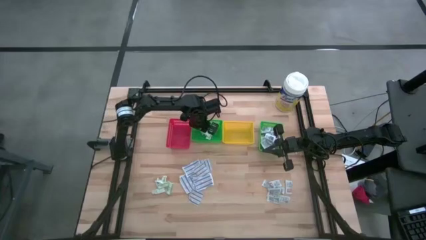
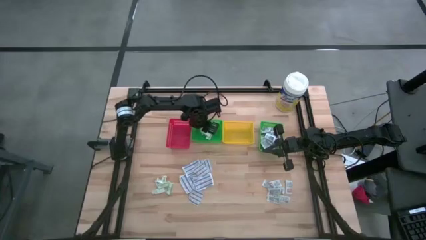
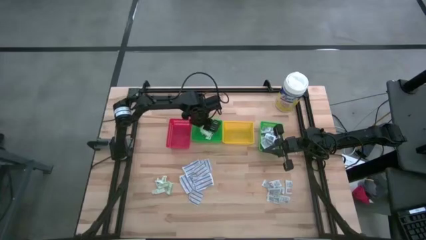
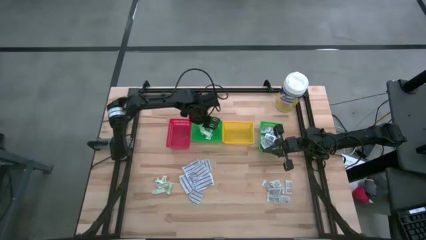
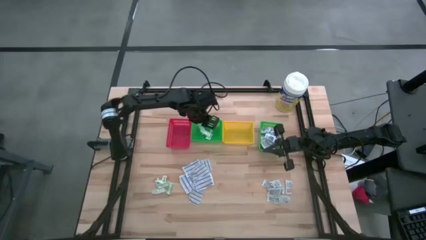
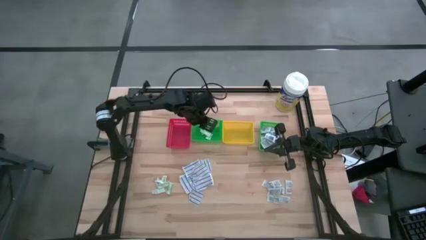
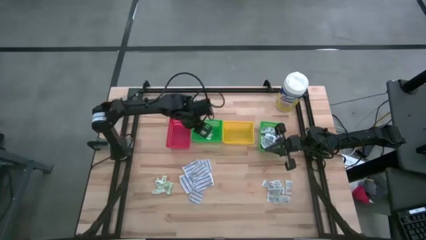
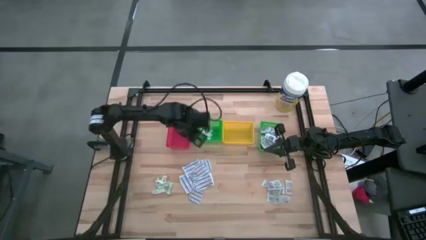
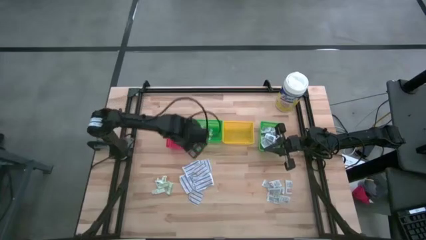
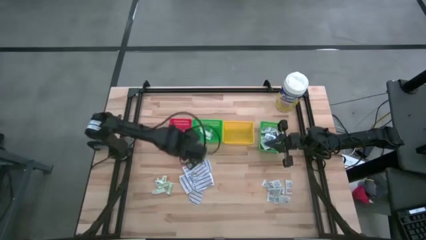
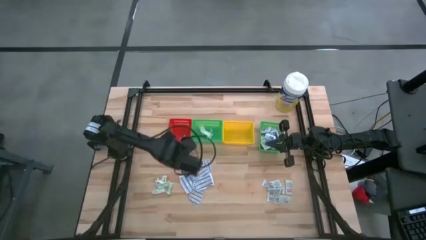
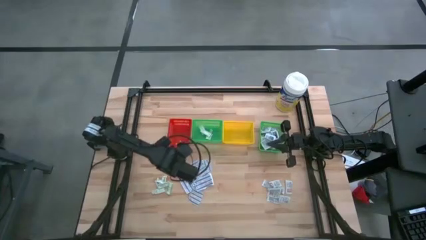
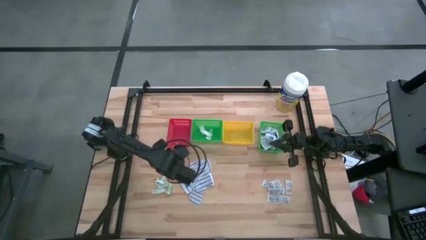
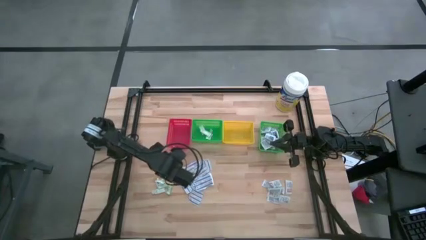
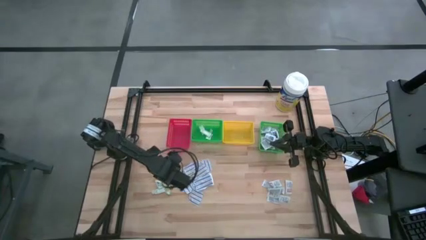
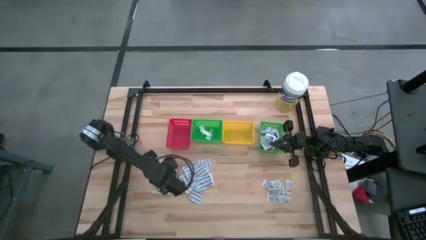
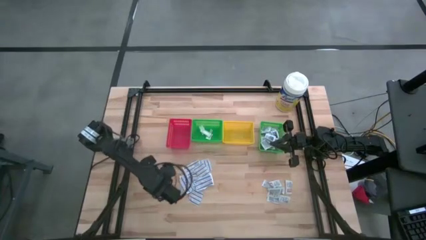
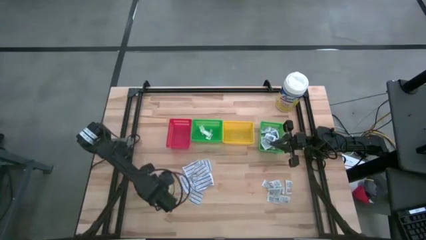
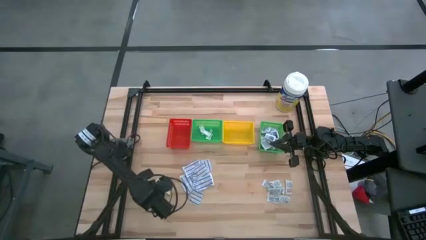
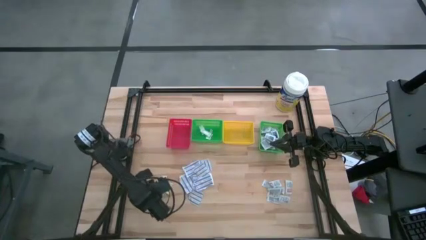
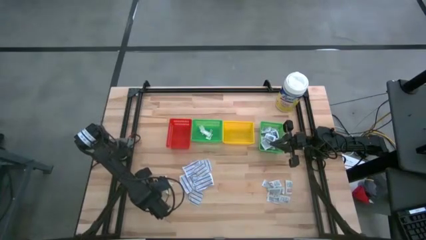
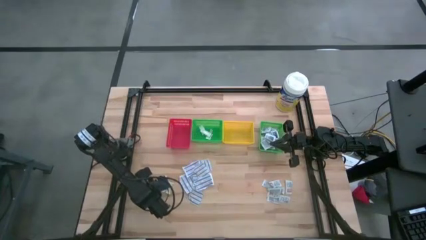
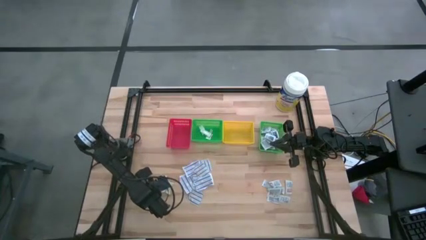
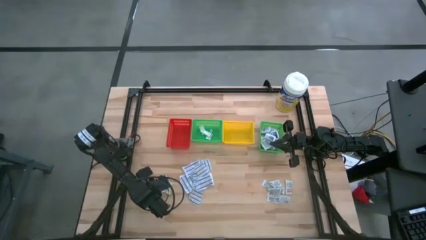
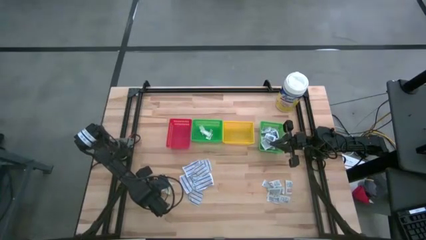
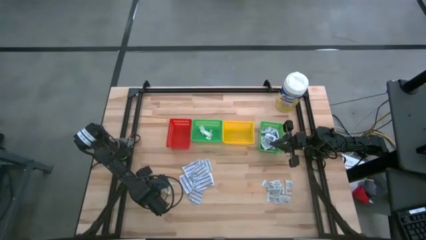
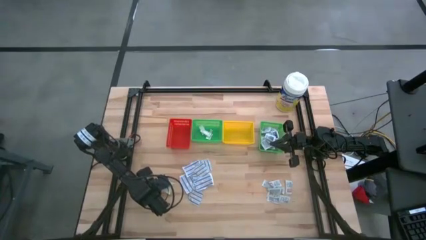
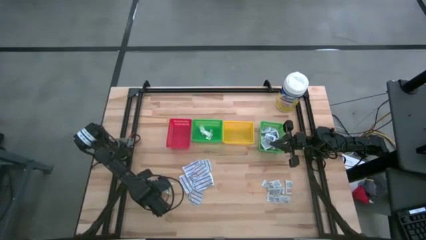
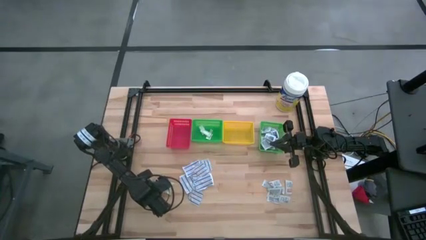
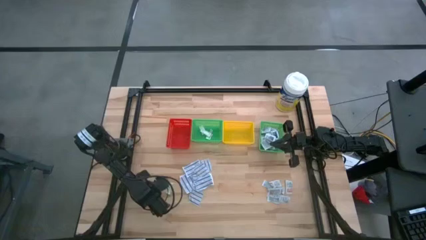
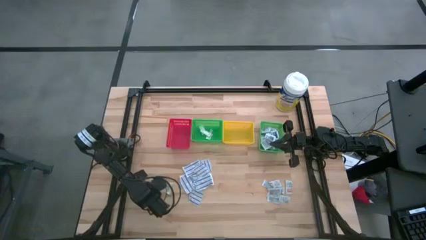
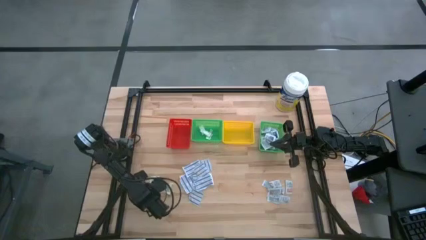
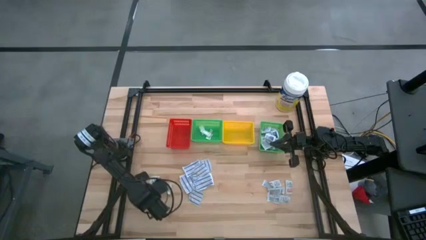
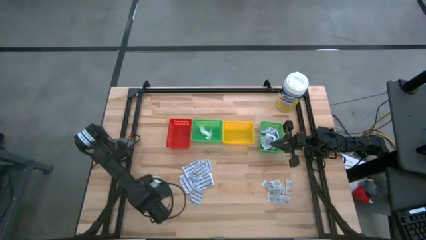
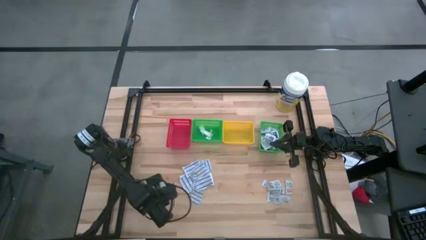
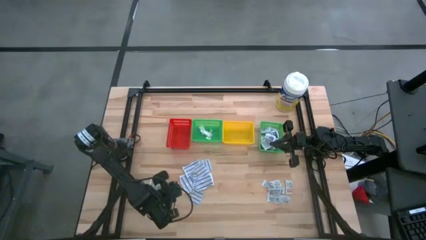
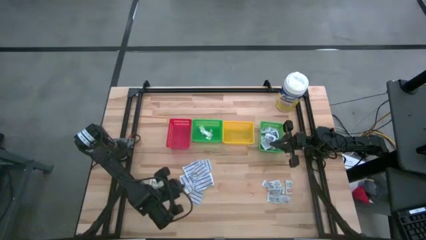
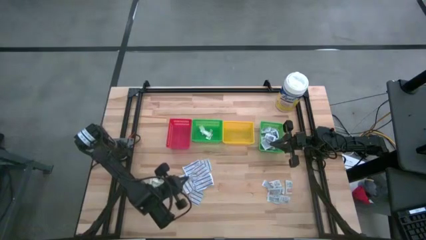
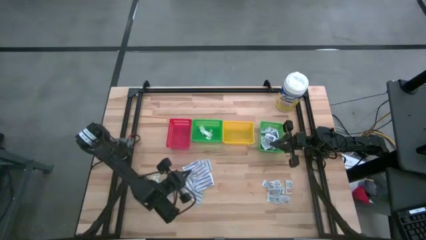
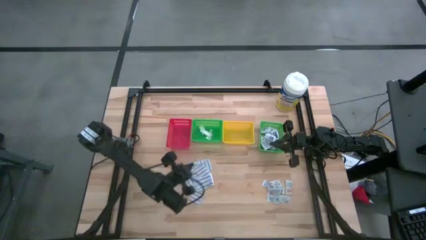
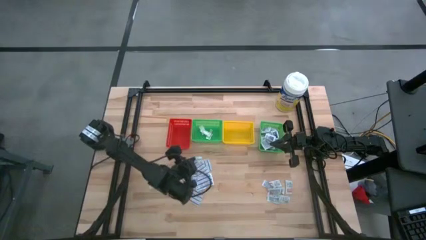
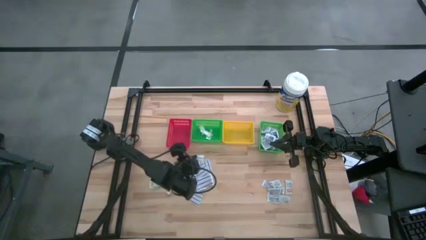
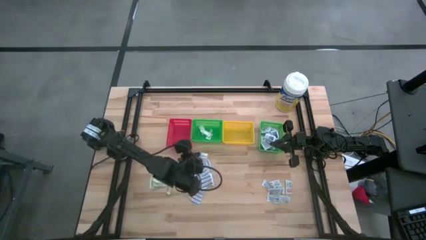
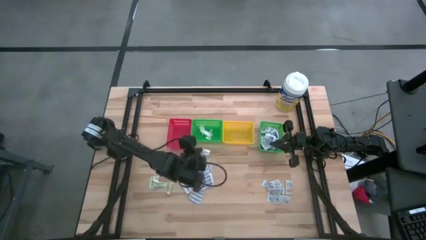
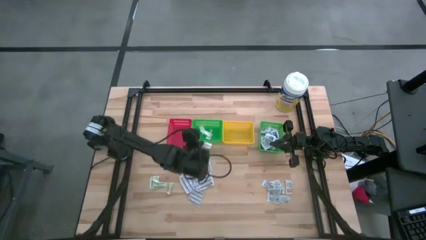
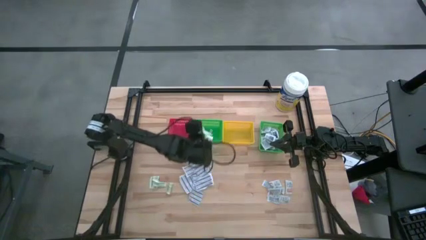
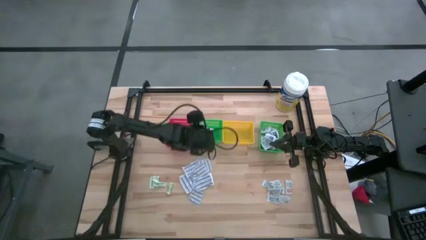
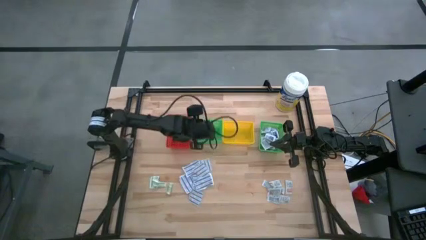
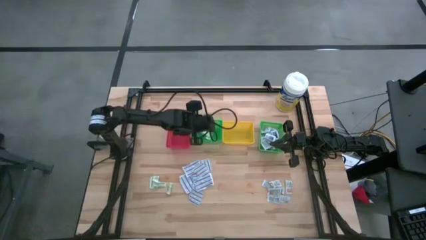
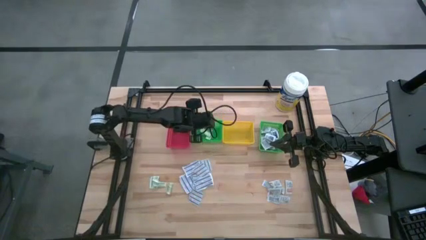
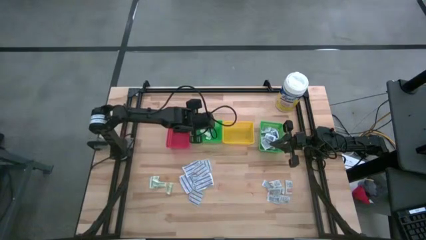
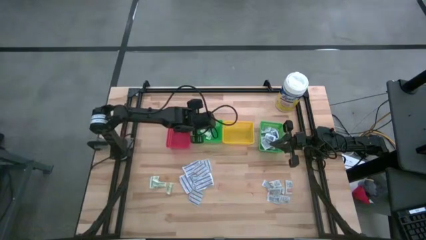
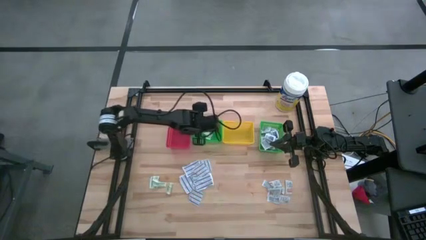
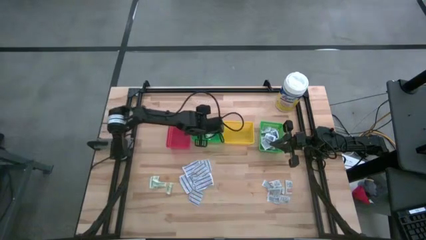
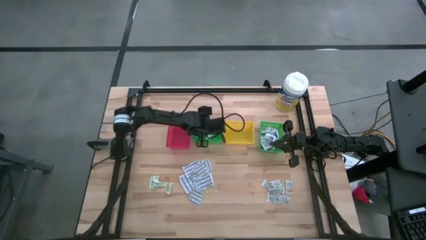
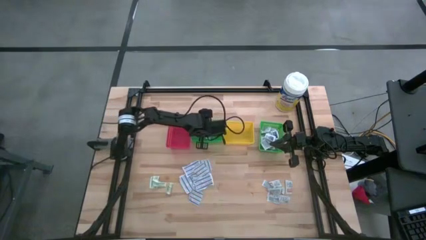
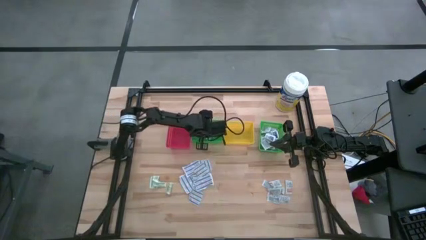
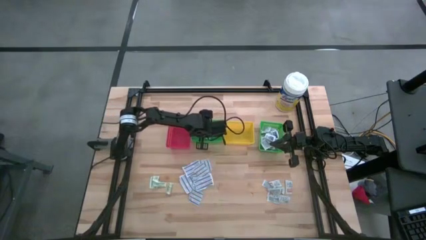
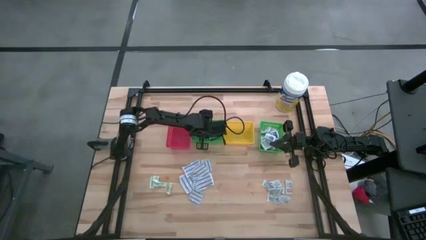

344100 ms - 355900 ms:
Task: Pick & Place First Aid Supplies
Put the green bandage into the left green bin

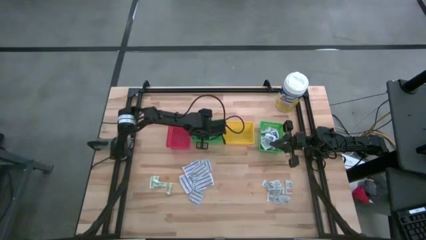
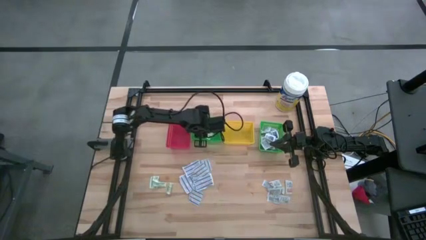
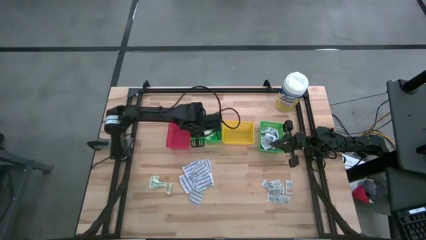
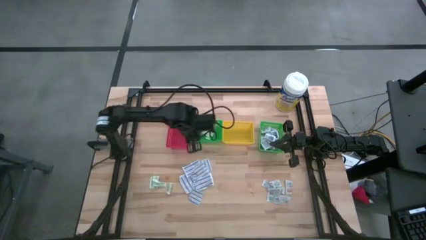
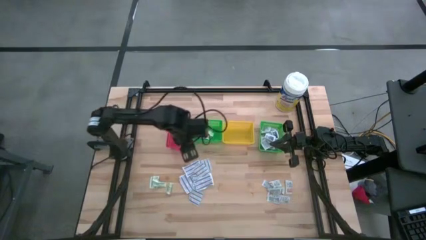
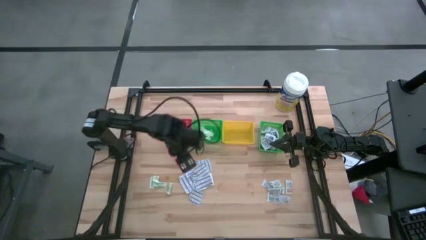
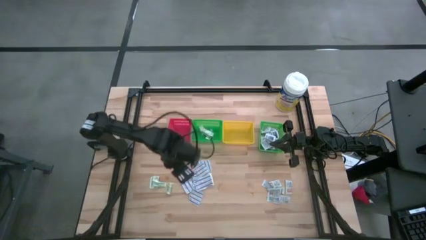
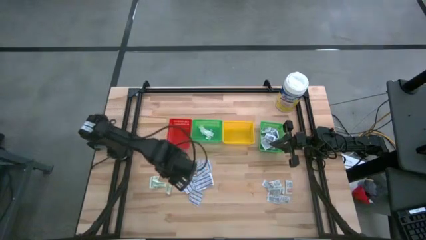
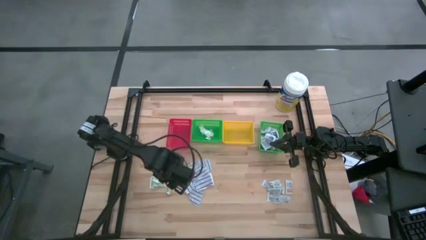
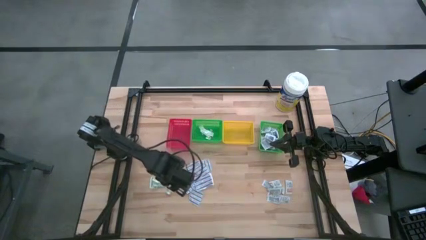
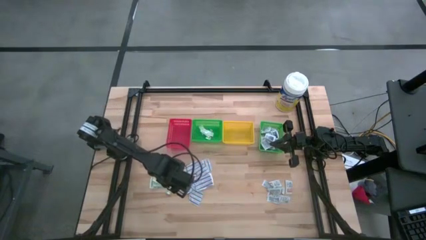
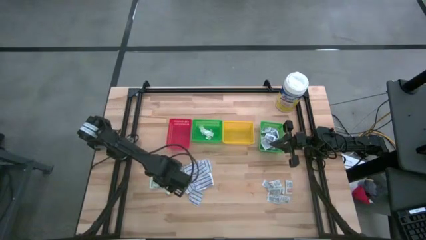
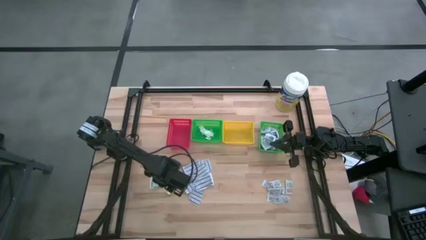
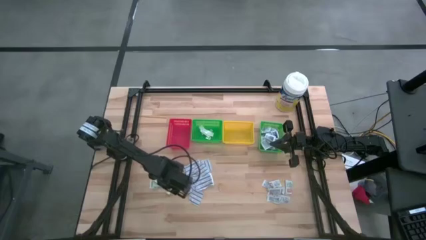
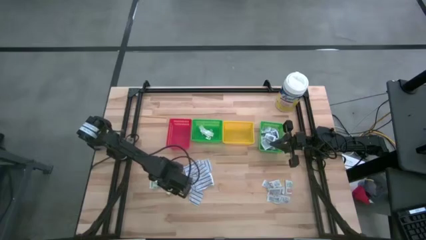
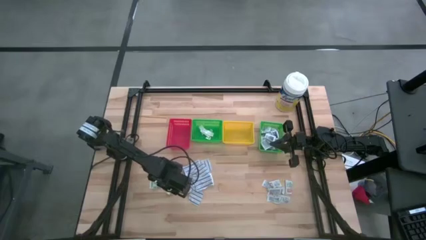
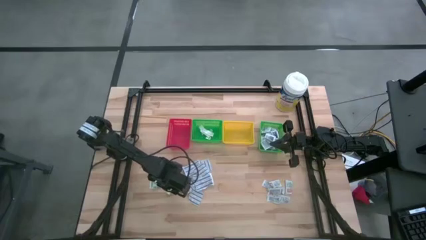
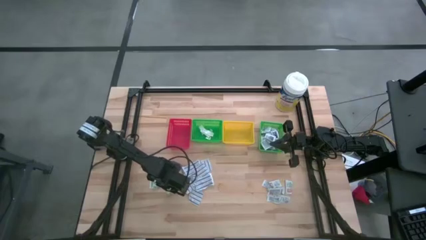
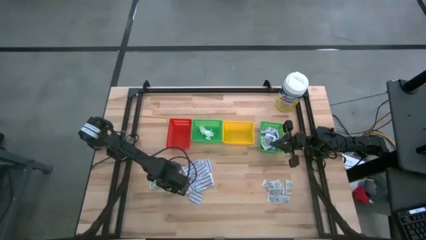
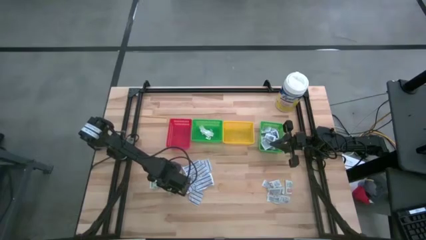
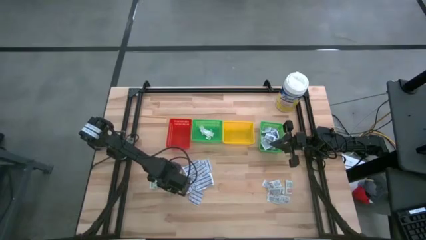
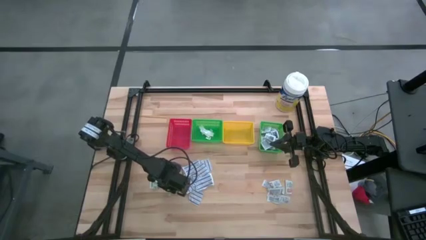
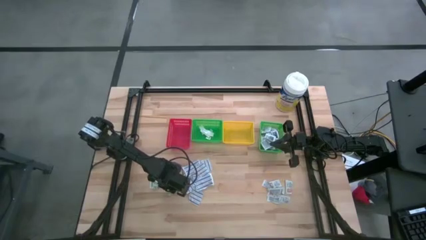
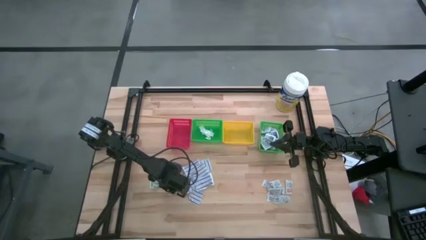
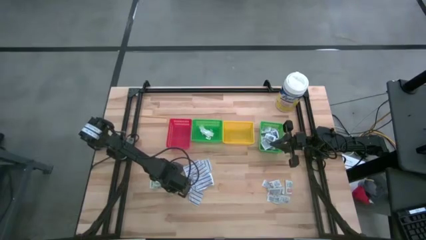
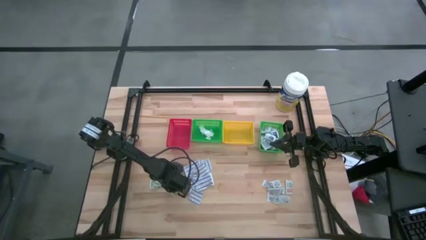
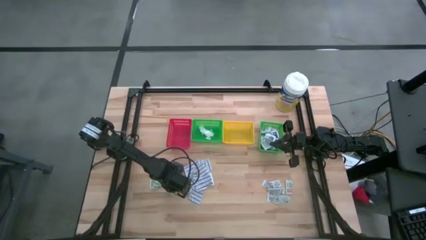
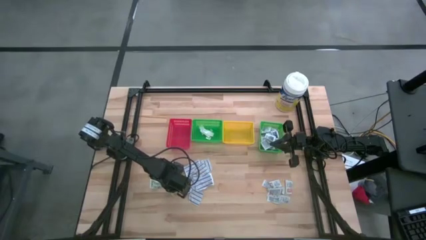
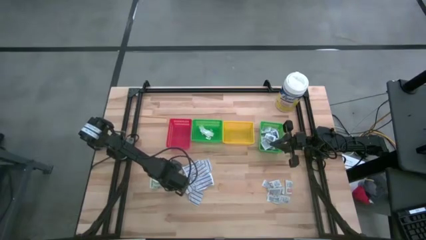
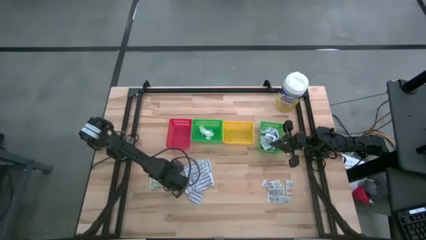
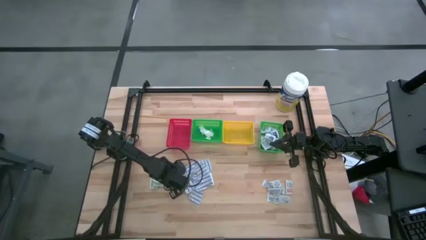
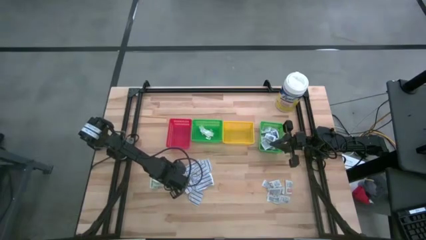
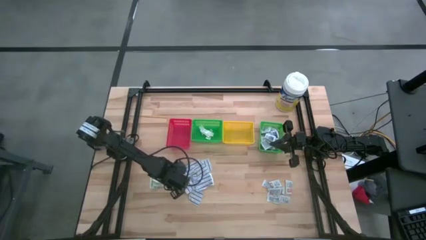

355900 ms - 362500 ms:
Put the green bandage into the left green bin
